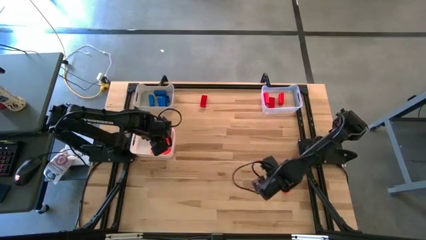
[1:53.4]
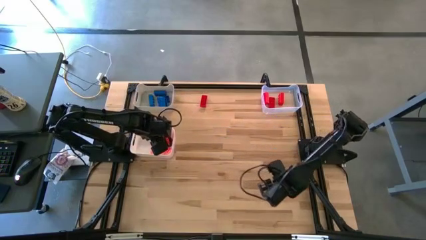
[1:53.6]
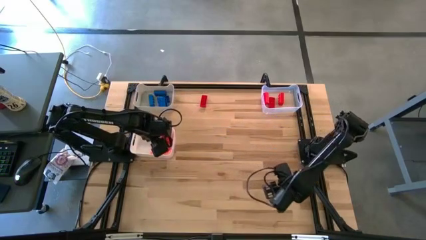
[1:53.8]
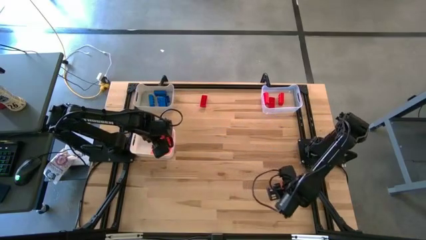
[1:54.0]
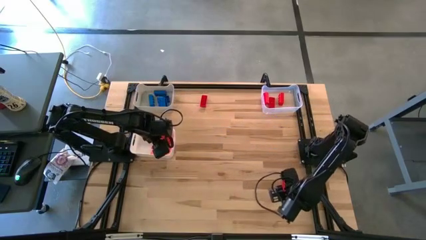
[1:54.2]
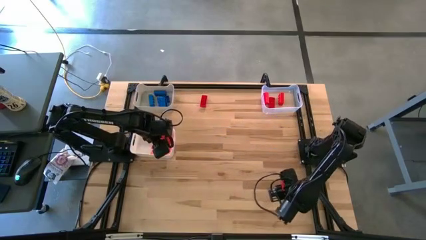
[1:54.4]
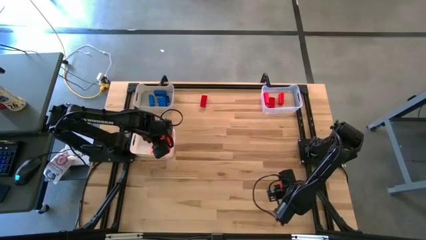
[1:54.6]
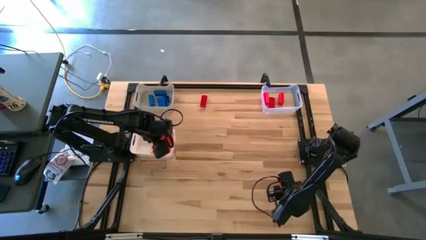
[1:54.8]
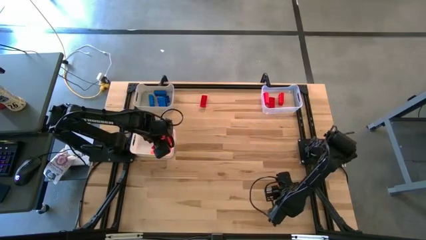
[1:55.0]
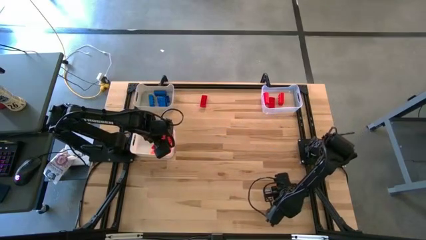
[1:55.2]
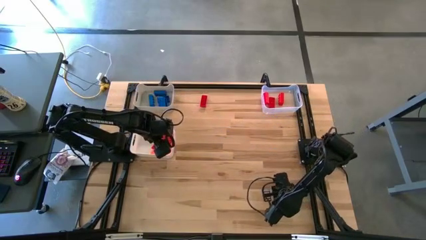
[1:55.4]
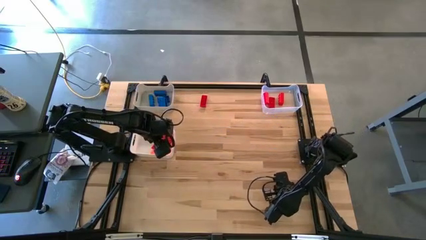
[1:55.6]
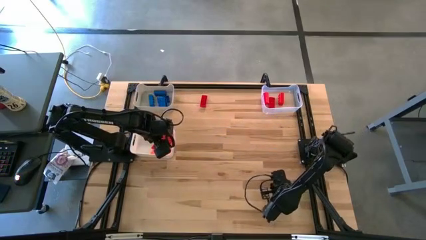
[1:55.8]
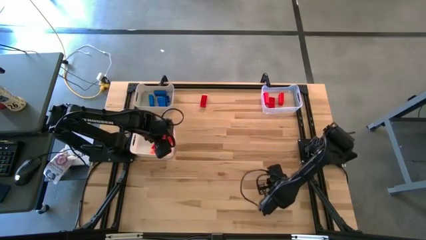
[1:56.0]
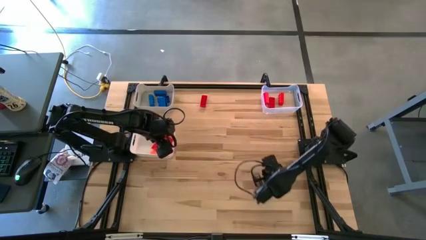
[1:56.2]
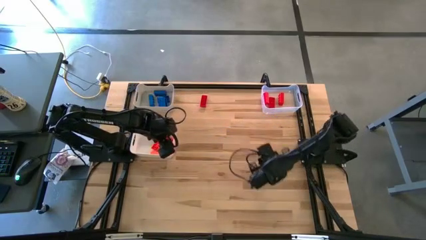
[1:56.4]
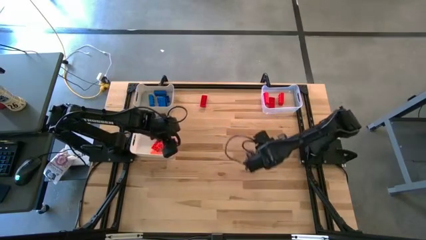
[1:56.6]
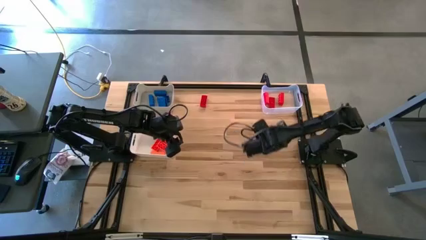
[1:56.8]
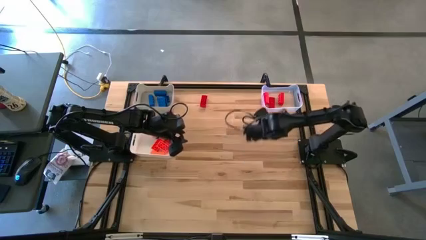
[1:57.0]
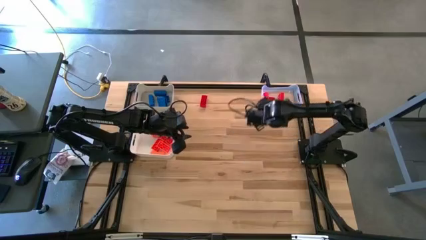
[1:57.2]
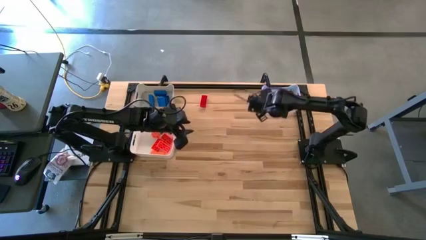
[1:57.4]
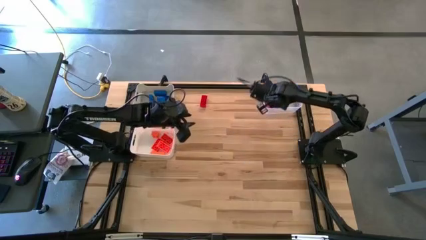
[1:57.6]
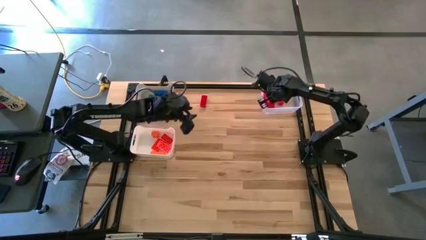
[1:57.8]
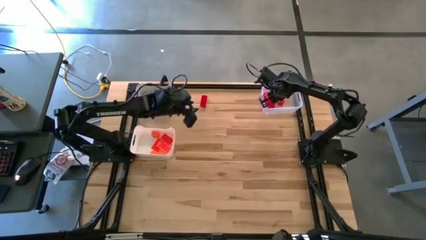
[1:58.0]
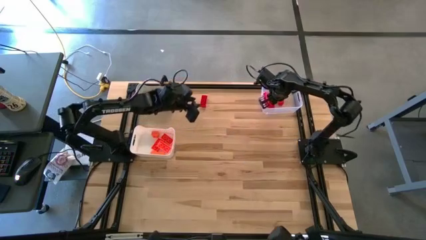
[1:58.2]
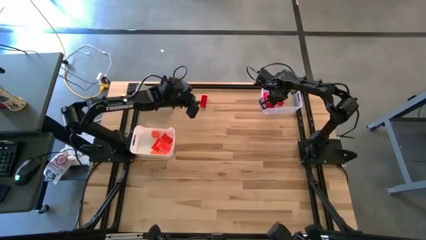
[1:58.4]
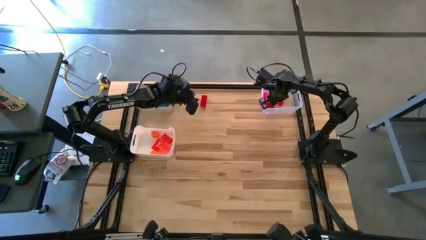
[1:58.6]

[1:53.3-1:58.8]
Task: Sort & place blocks by color
Put the red game piece into the transparent bin

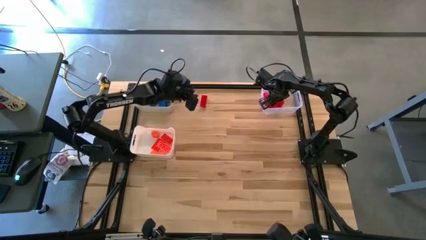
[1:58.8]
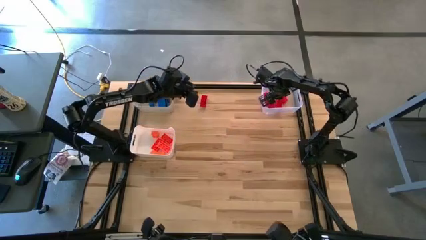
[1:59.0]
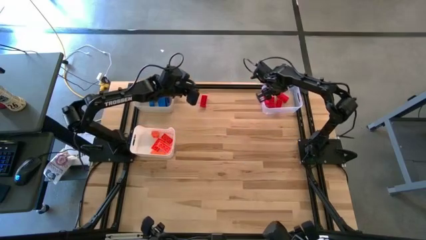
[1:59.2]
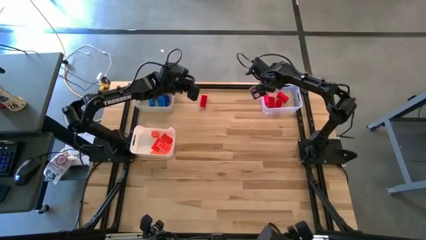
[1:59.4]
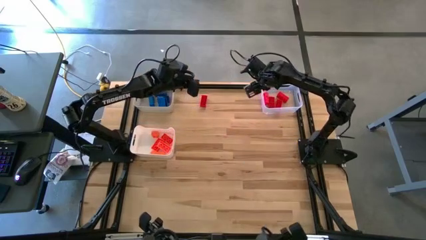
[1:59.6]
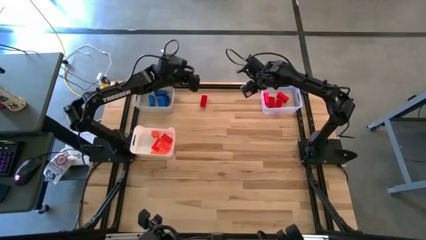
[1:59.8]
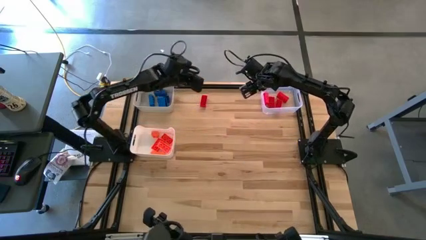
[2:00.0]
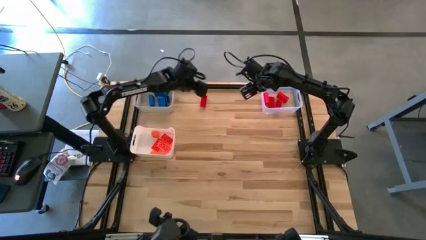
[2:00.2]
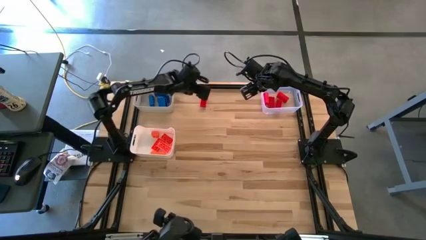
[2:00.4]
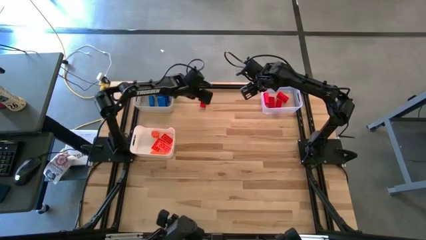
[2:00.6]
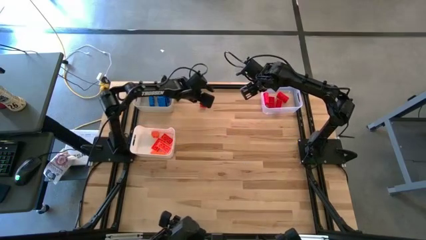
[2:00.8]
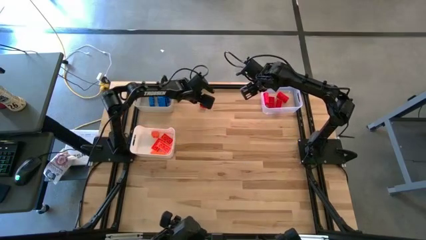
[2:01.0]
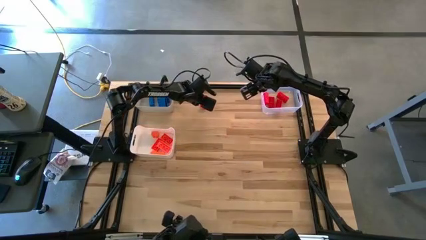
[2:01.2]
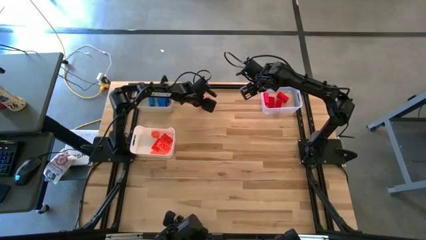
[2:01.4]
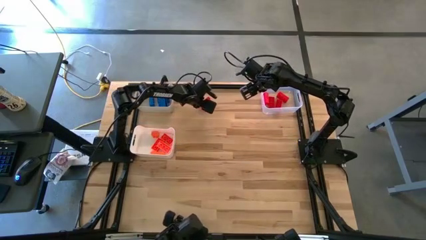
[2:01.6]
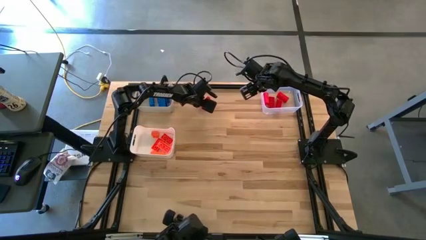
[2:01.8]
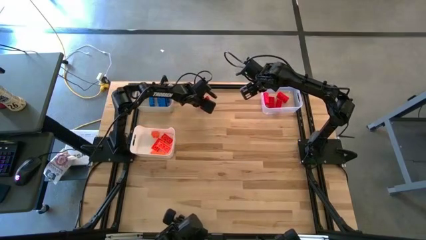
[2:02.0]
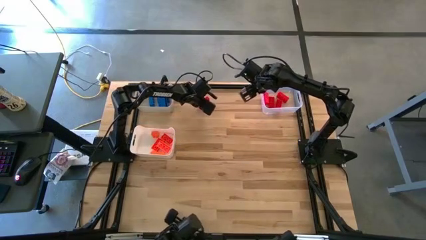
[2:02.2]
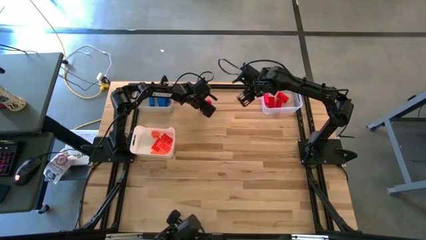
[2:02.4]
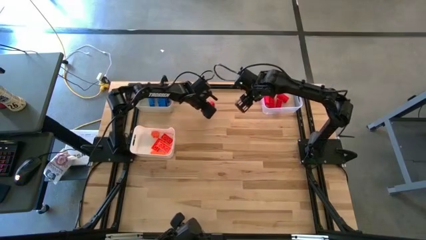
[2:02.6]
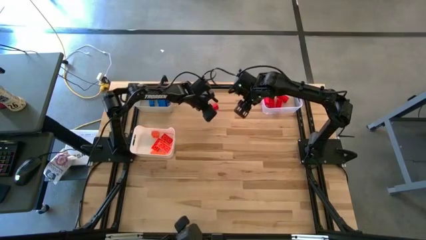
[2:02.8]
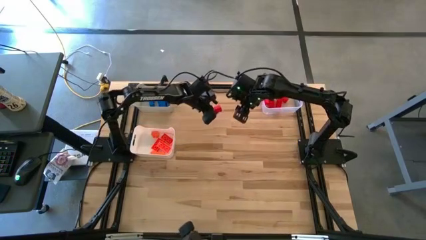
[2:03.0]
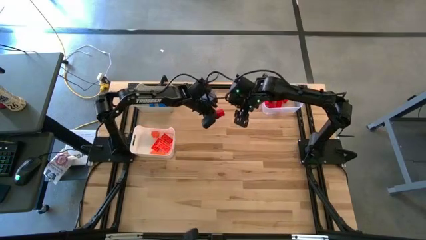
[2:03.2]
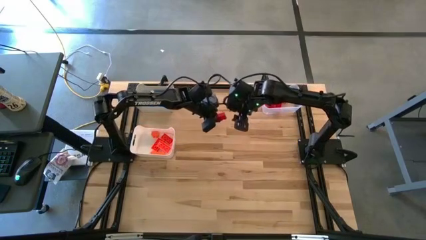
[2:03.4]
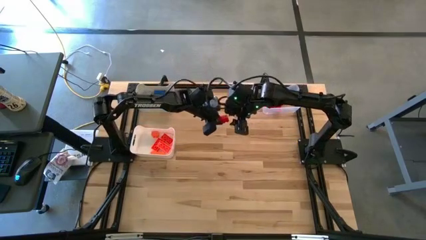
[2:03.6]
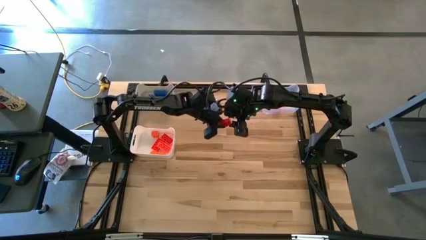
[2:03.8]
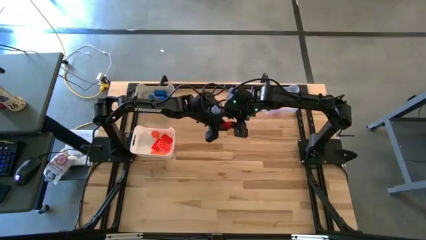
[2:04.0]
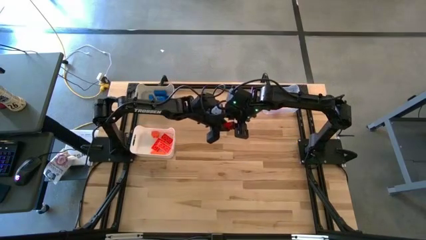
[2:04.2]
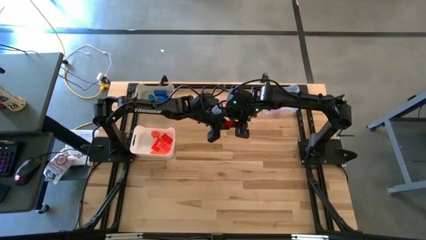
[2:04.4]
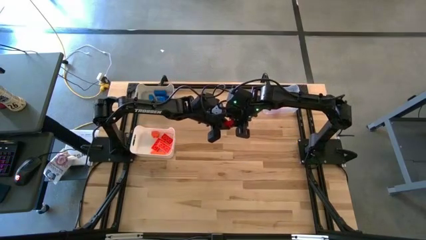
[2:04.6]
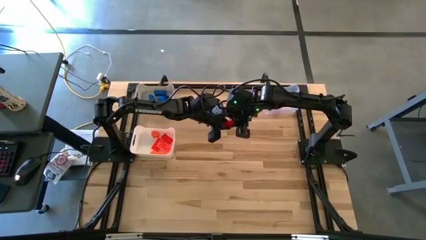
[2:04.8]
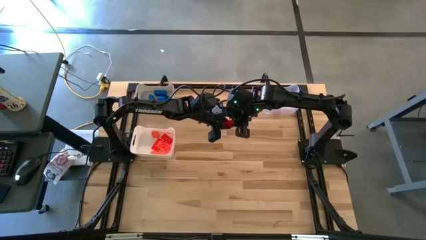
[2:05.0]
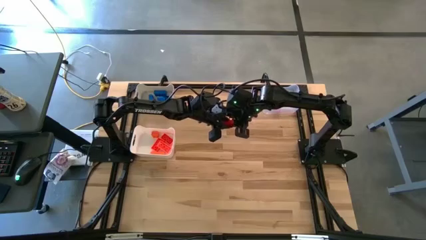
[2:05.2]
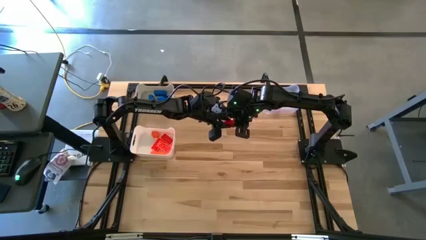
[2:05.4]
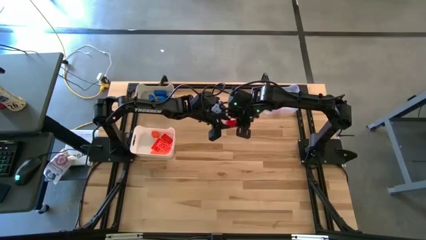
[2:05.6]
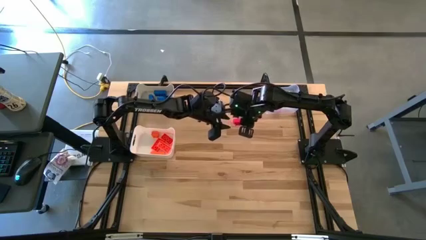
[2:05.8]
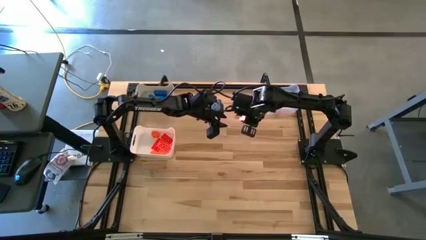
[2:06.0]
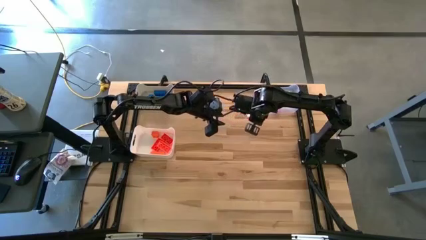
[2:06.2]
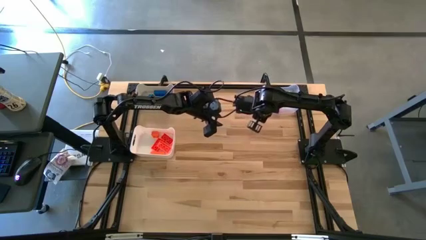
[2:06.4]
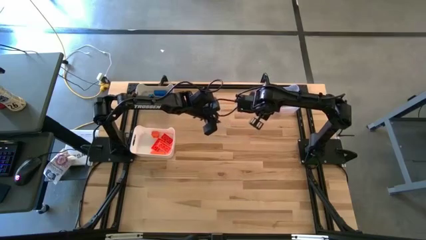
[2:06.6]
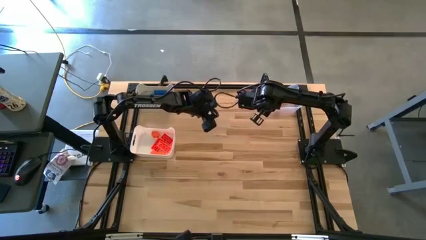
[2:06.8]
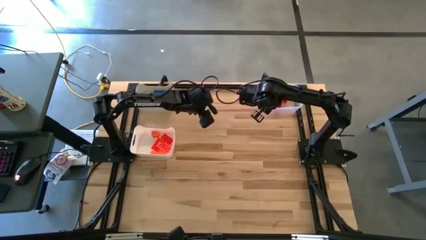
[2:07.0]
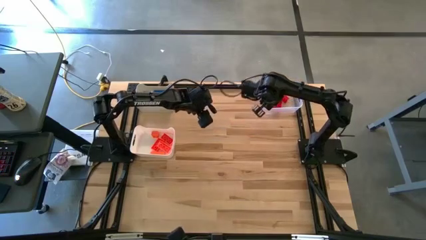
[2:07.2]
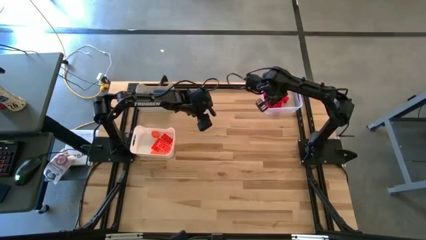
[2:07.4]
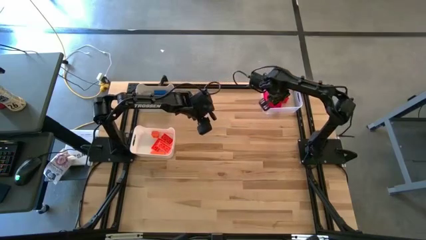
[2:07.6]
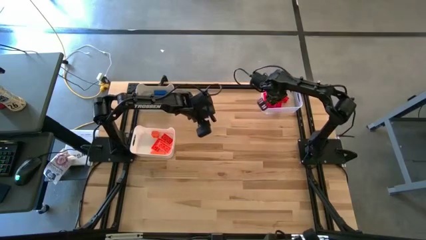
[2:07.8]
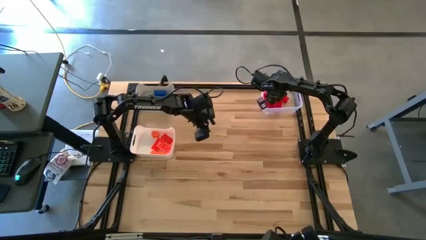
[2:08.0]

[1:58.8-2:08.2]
Put the red game piece into the transparent bin

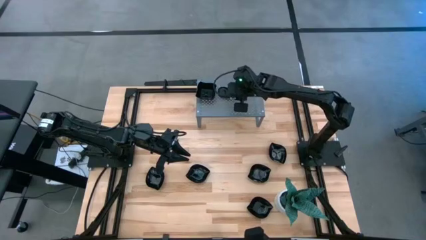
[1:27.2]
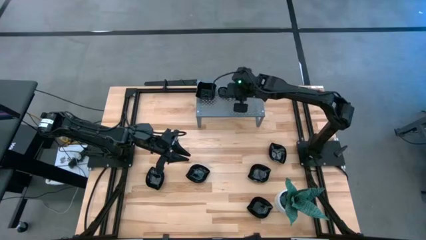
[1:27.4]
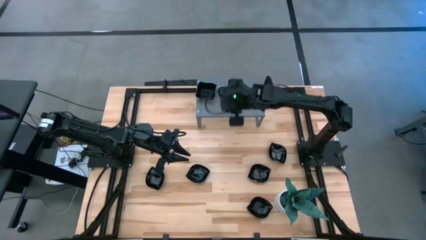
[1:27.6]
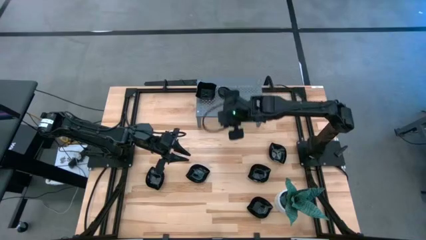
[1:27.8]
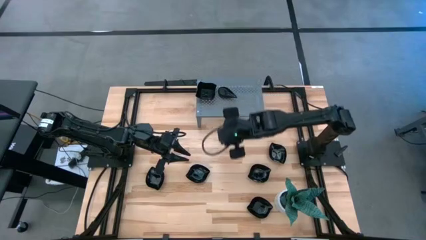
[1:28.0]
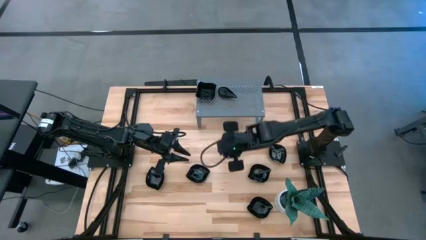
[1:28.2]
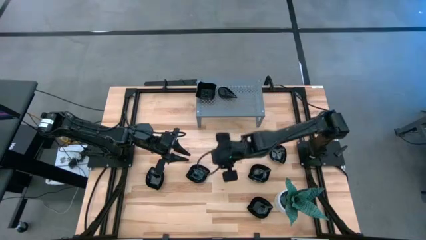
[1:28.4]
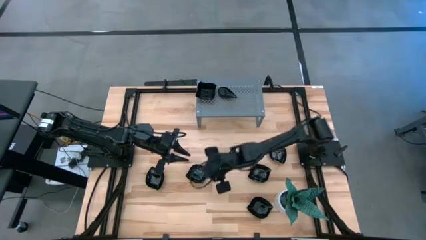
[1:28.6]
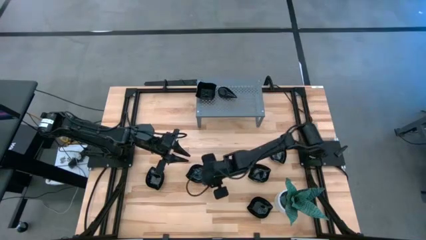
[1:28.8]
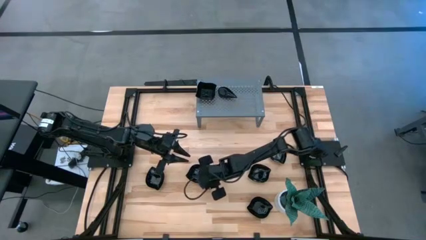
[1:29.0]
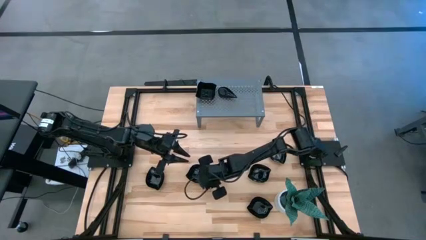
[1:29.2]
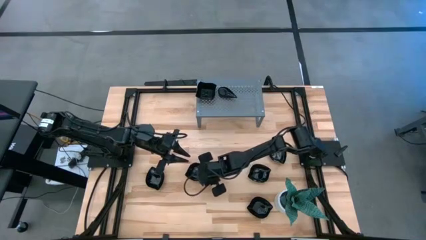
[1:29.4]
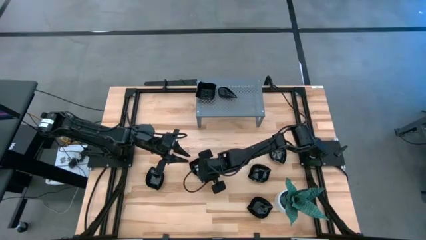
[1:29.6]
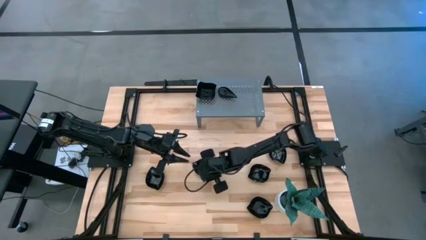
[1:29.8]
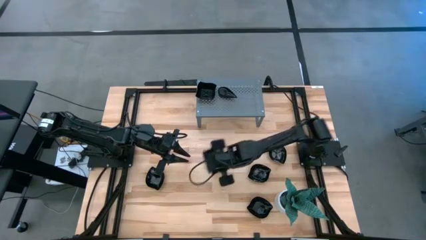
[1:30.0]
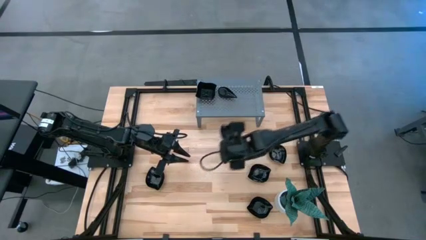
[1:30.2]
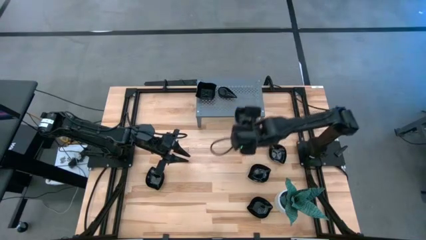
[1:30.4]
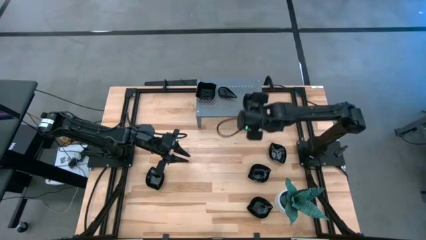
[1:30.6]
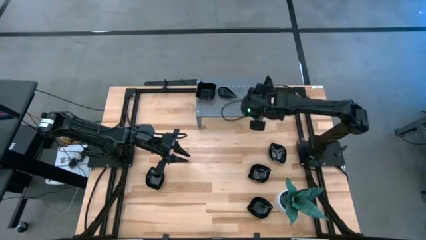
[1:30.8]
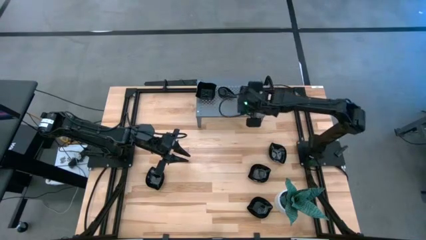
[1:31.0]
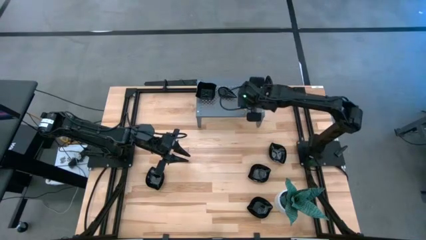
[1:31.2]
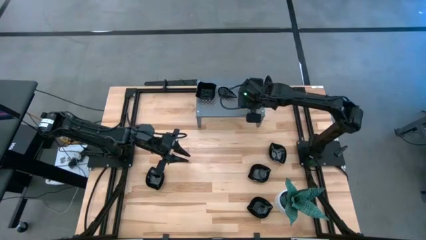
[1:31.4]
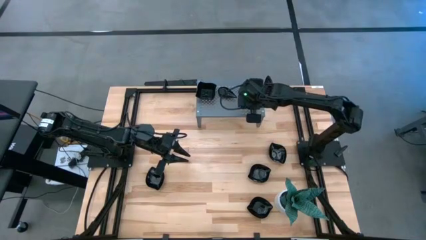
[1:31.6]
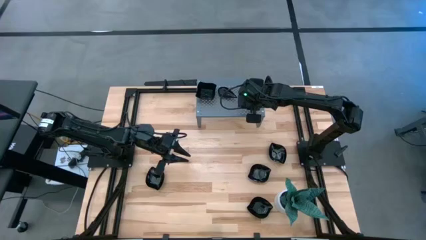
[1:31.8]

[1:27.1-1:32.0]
Task: Pick & Place Mini shaped plates
Put the leaf-shaped plate on the shelf
